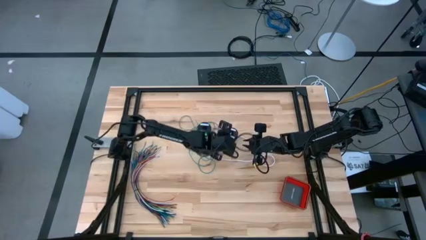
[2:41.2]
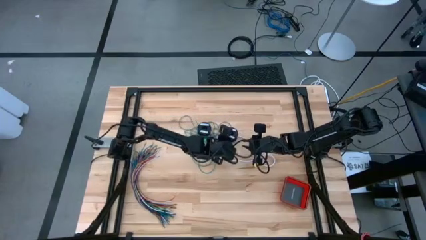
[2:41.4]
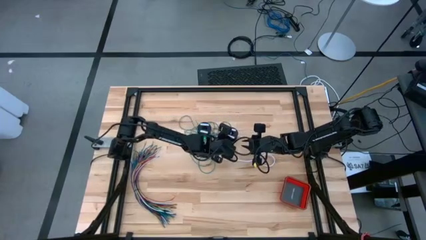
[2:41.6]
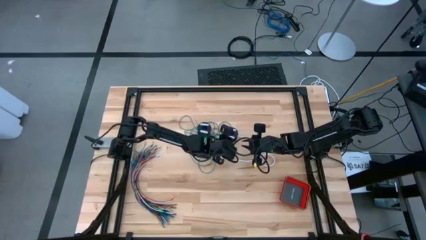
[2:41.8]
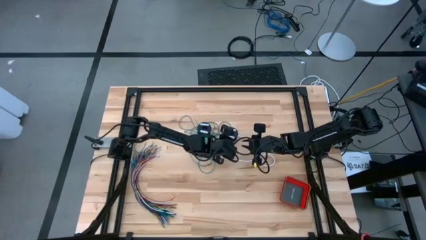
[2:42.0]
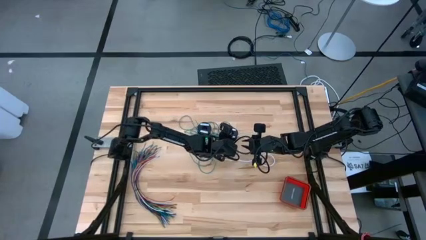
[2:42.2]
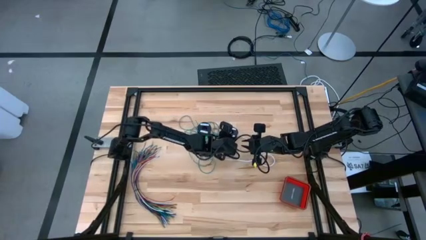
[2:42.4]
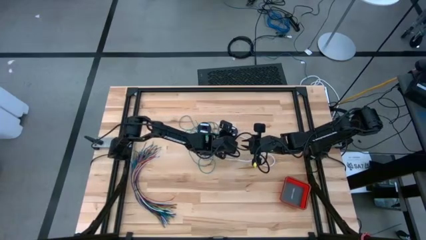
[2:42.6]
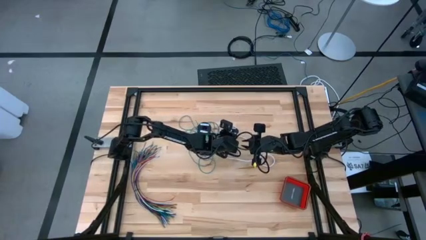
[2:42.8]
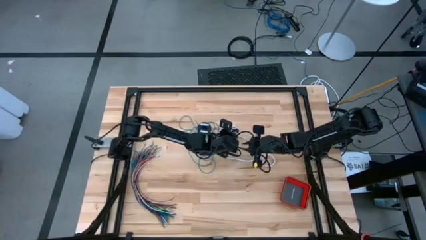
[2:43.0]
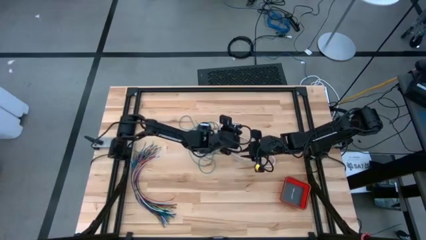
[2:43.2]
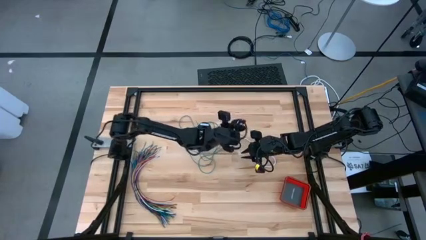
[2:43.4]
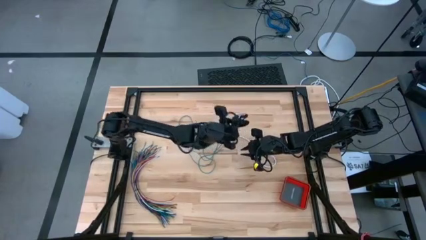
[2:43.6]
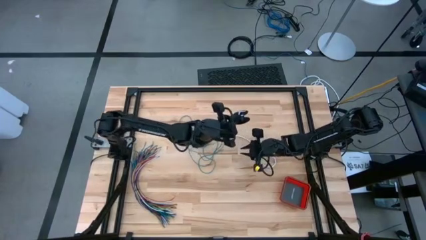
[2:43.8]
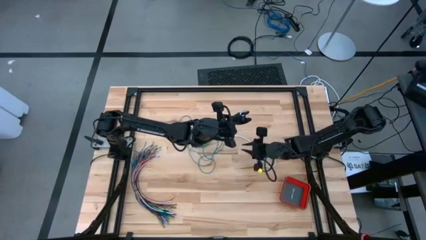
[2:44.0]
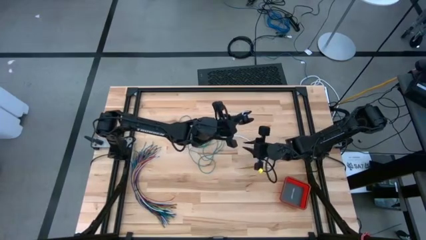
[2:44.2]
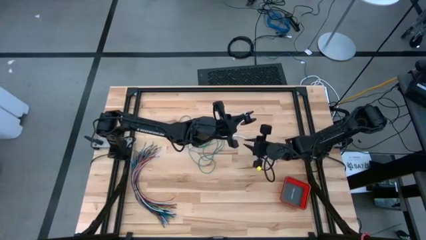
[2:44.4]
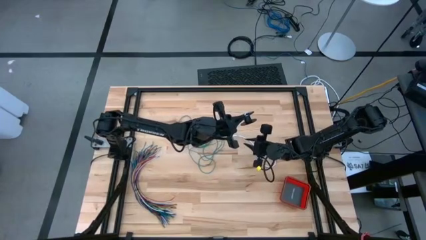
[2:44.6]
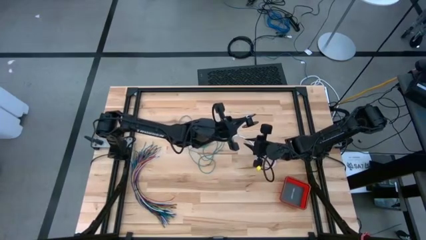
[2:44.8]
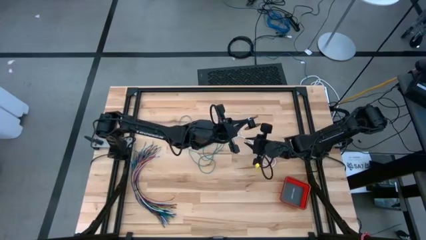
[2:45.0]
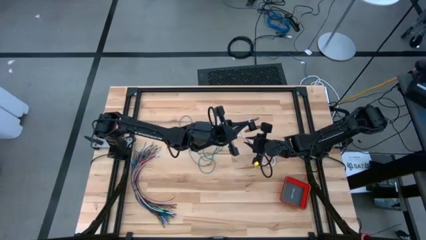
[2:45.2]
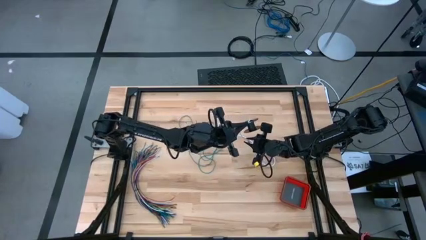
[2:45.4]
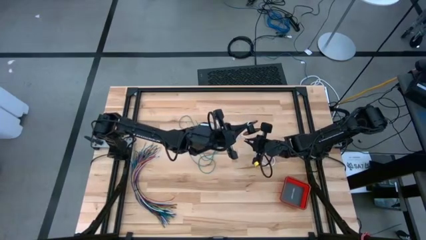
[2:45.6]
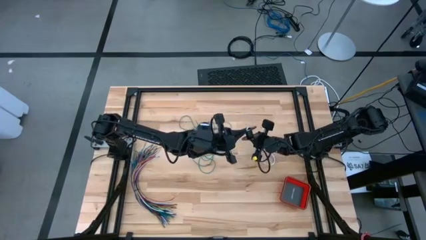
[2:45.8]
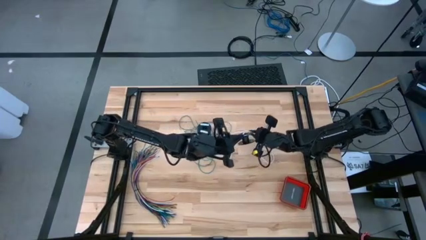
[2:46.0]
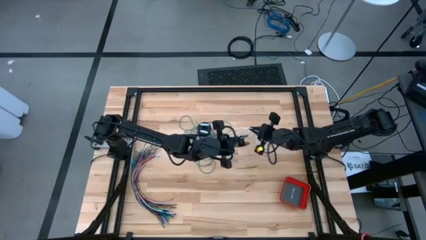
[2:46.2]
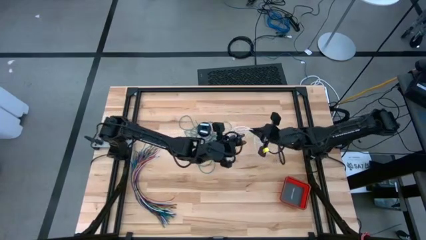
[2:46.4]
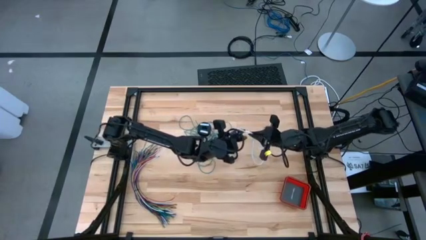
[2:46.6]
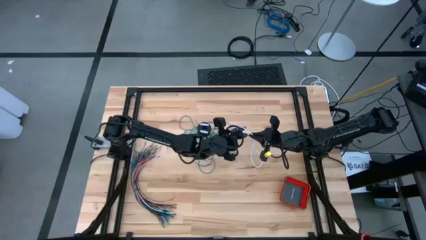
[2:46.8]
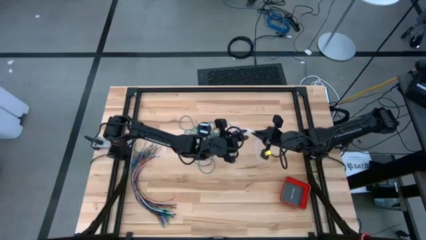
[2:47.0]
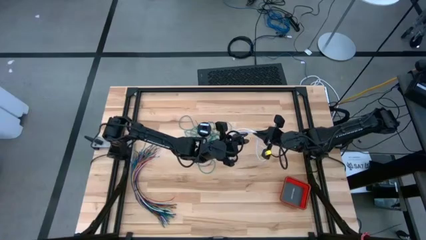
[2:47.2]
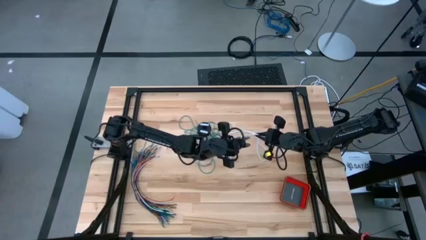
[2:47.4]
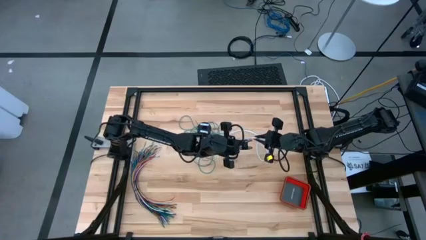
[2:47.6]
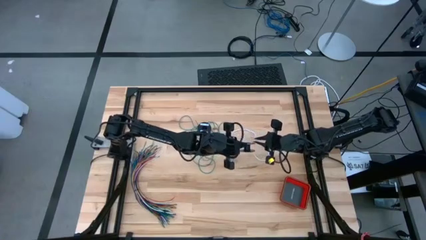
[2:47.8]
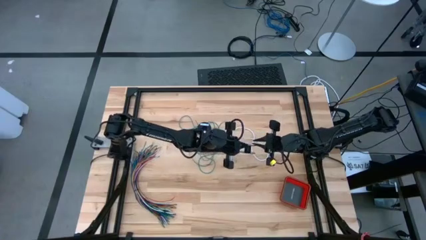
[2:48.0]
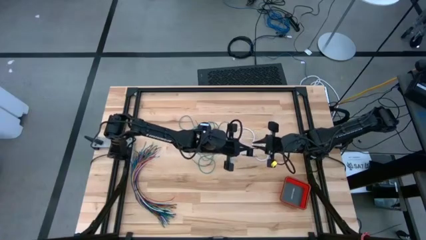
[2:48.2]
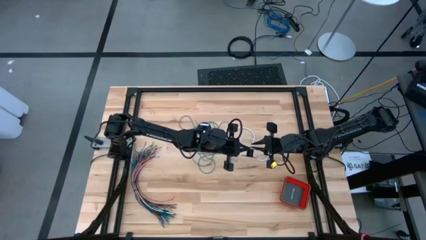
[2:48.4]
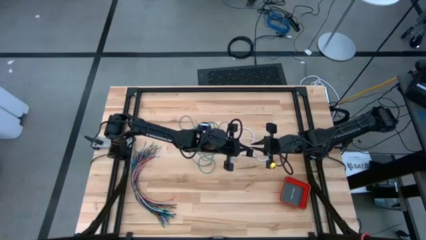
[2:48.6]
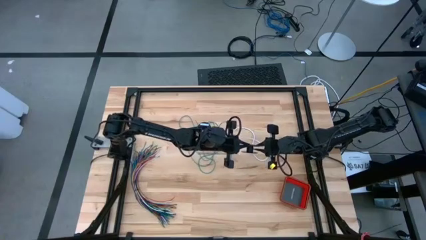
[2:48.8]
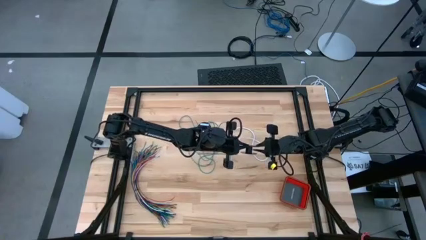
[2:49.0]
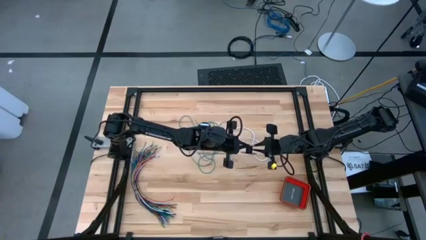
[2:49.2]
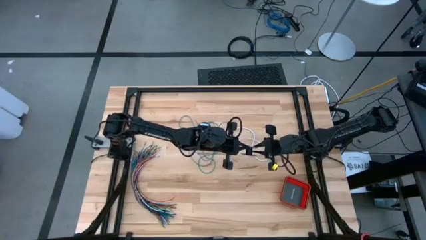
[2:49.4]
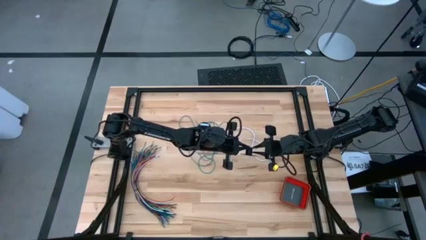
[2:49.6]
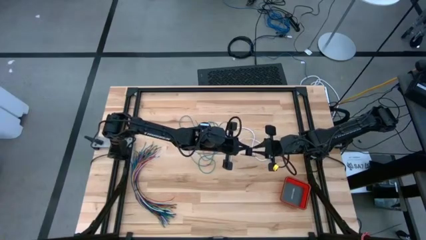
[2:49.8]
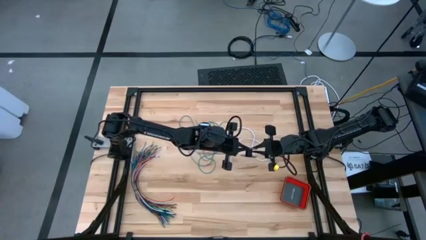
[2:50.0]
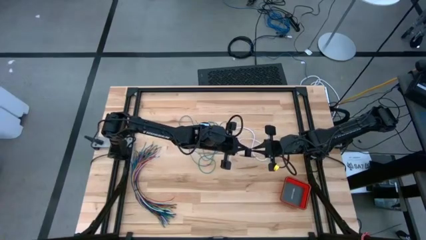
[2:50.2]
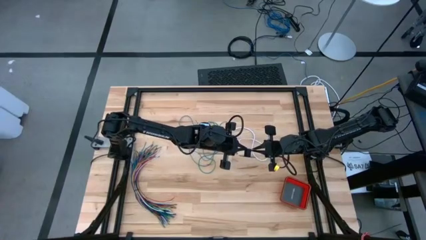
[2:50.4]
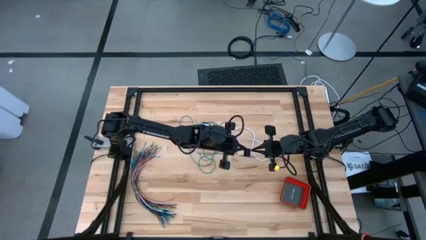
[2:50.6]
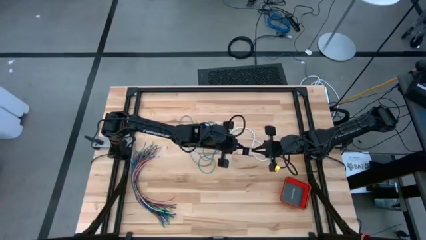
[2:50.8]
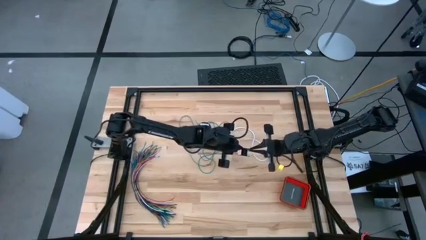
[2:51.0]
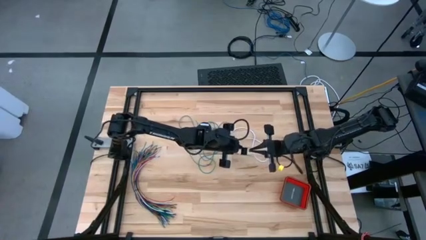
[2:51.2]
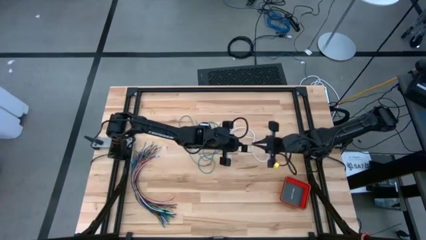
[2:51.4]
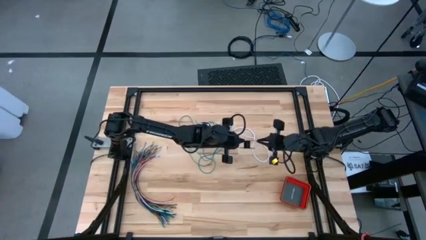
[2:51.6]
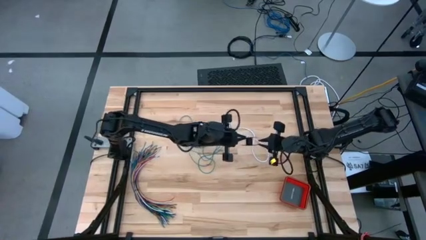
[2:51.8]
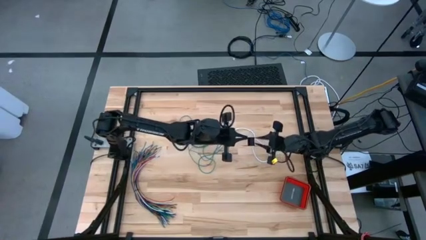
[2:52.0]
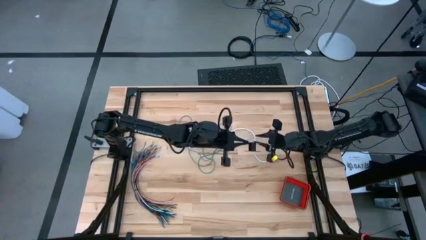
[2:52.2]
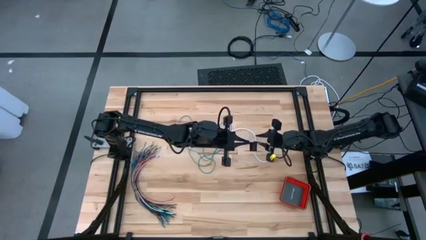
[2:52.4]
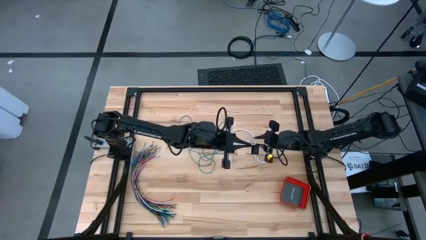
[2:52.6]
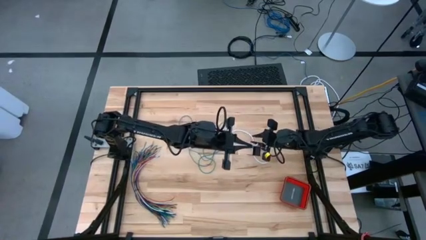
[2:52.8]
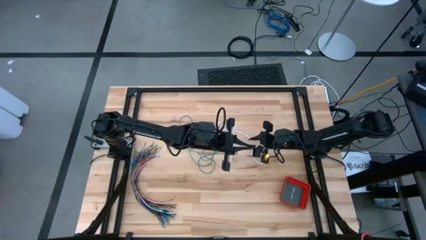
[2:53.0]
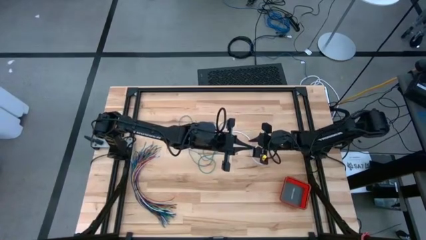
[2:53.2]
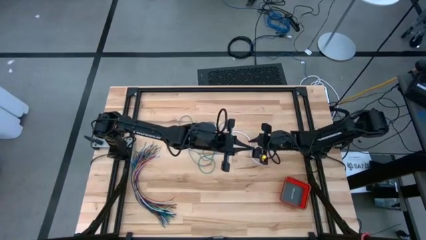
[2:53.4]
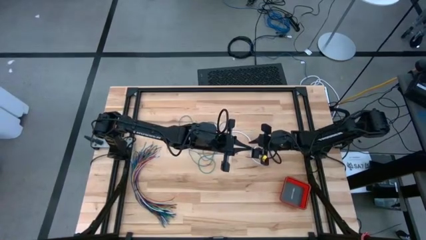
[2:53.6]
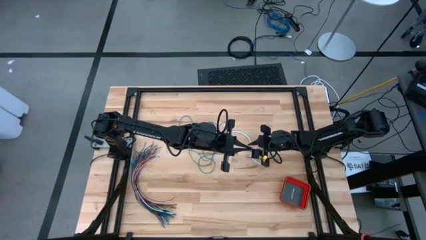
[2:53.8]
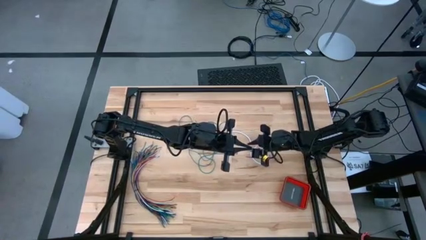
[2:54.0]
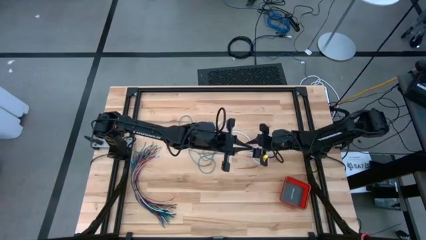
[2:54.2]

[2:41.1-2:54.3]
Task: Coil cords
Coil the white wire onto the spool

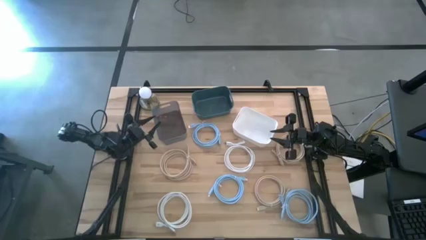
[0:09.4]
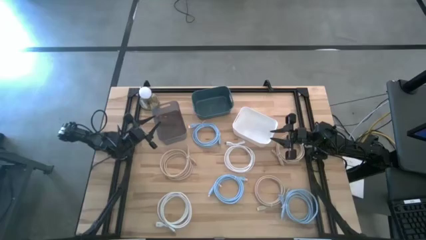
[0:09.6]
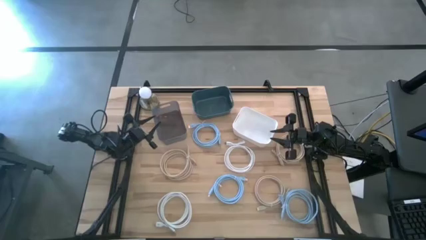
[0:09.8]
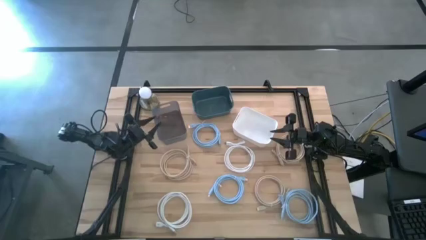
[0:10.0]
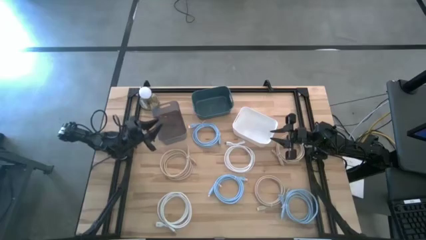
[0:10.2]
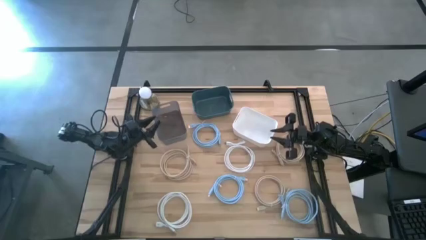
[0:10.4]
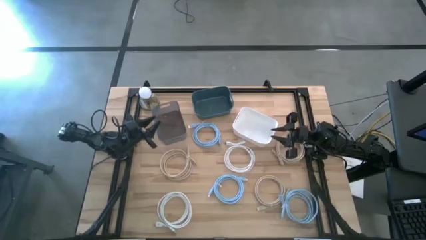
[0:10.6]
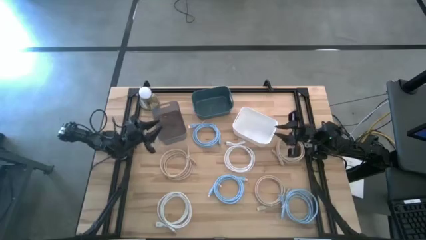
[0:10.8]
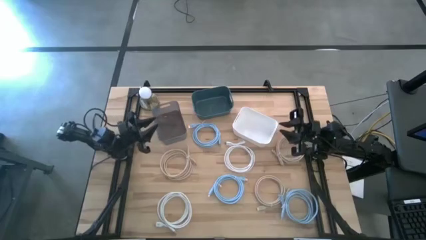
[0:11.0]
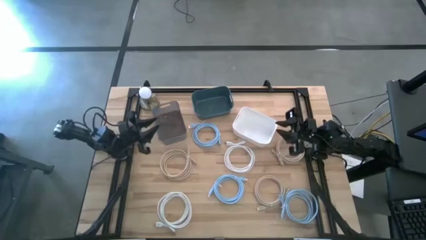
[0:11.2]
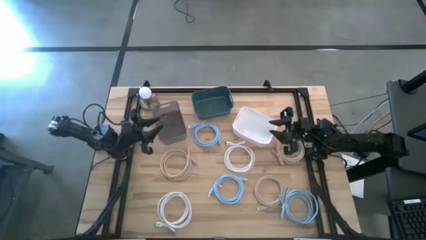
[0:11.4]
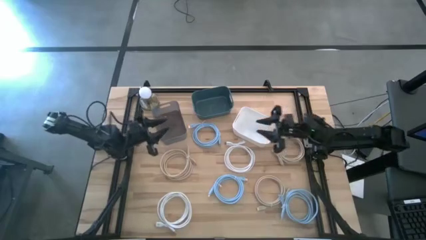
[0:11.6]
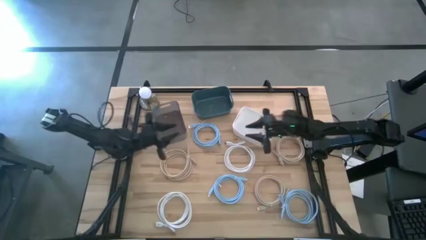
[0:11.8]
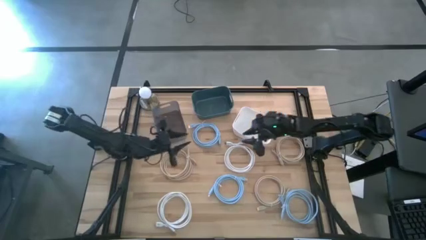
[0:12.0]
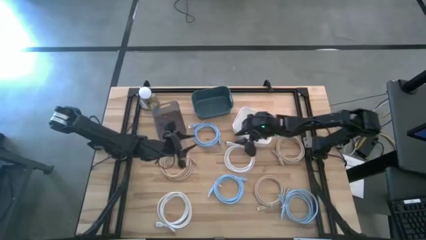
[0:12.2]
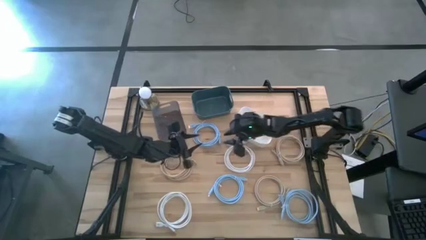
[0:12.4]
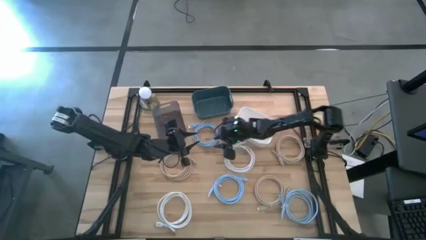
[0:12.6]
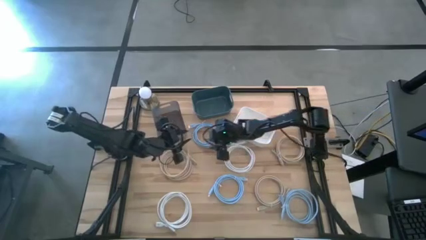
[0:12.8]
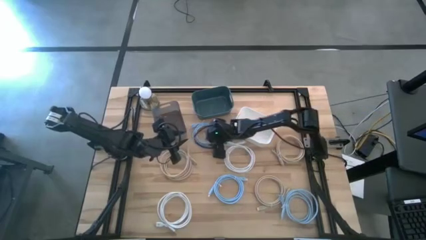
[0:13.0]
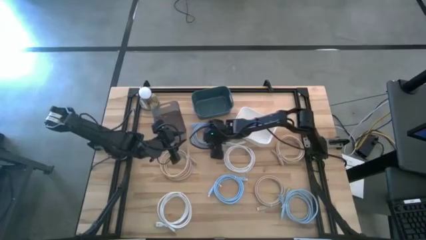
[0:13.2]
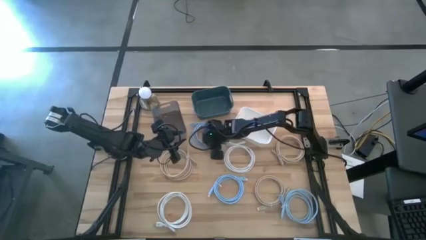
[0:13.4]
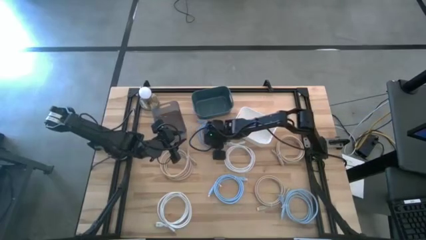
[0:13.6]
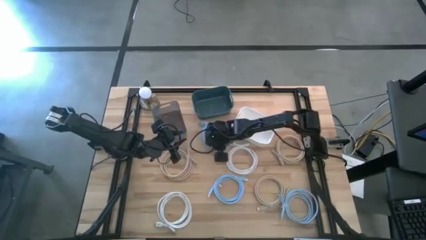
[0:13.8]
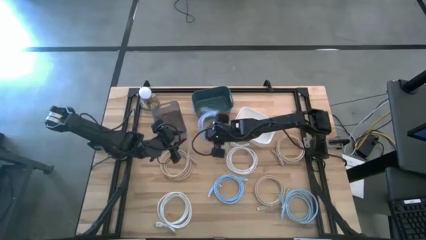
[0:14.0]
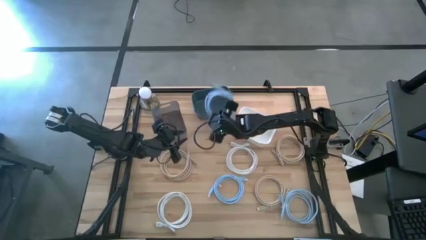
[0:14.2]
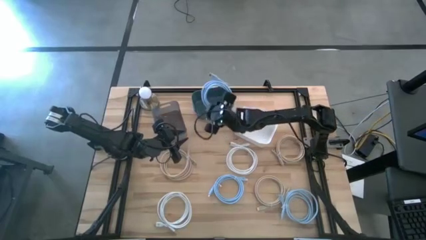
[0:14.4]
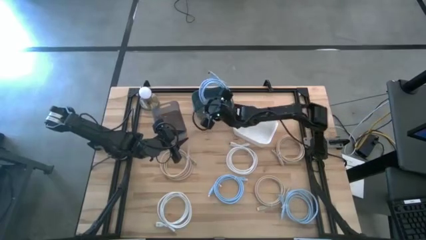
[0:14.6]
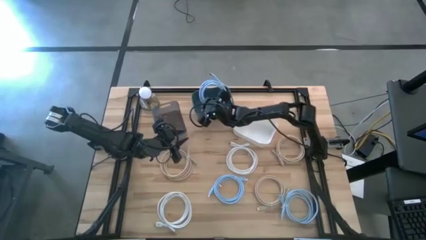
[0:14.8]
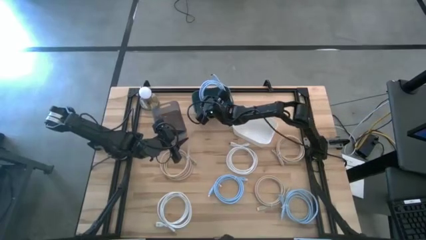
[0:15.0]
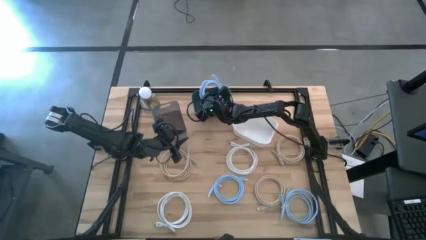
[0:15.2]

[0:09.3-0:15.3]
Task: Sort HDMI cables
Put the top blue HDMI cable into the blue bin
